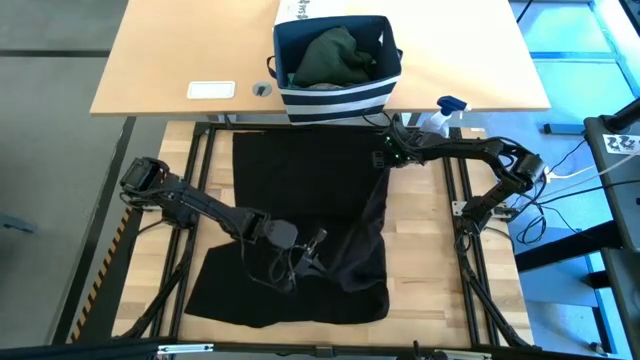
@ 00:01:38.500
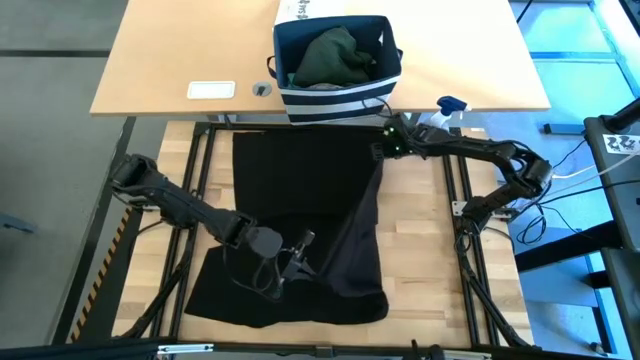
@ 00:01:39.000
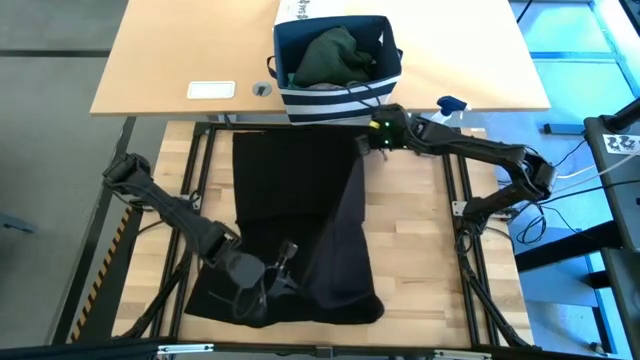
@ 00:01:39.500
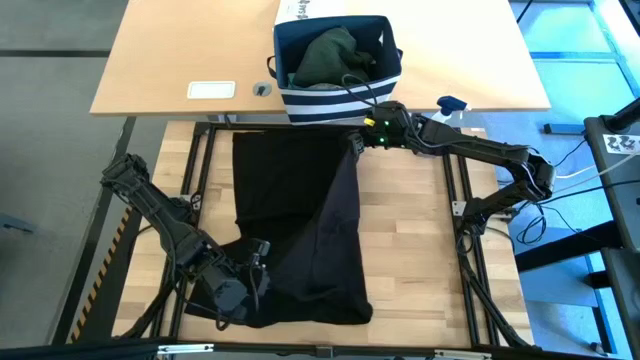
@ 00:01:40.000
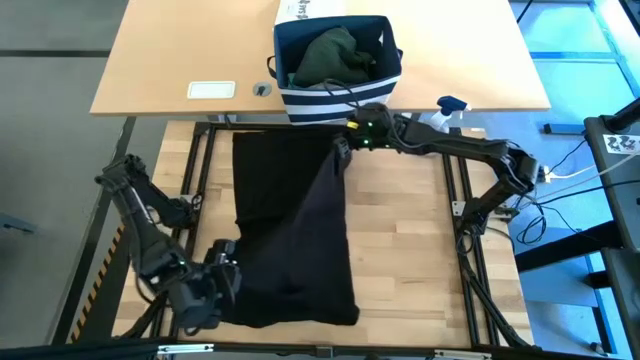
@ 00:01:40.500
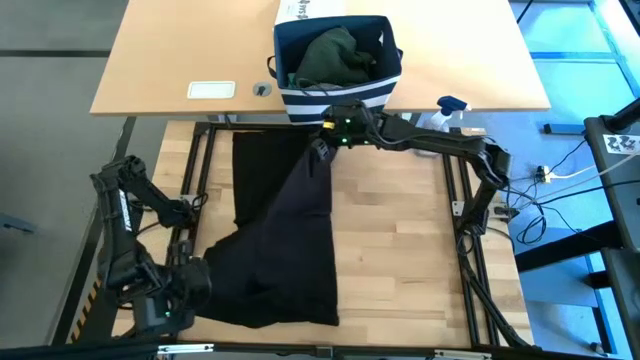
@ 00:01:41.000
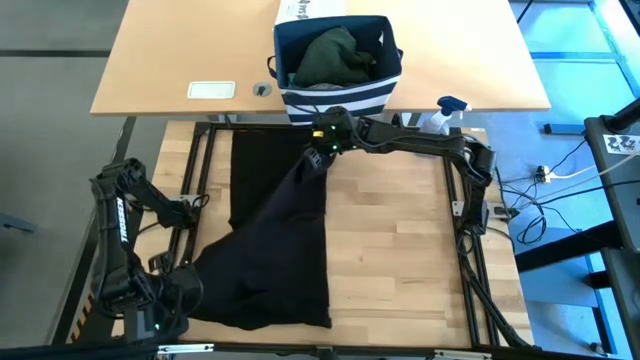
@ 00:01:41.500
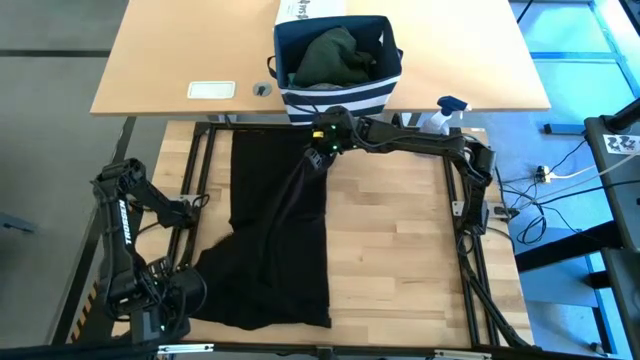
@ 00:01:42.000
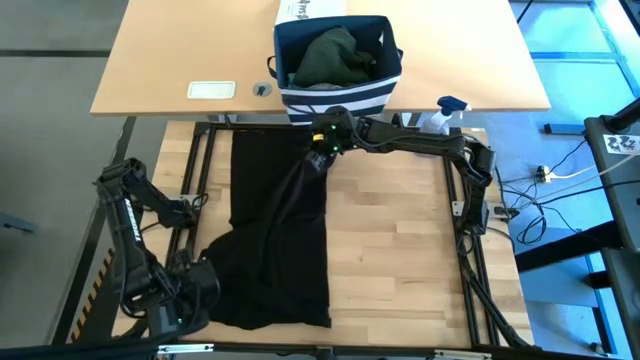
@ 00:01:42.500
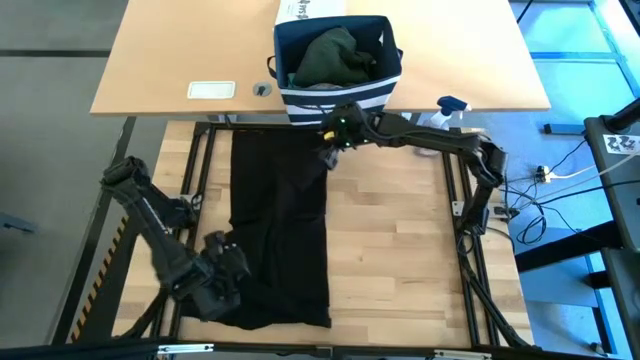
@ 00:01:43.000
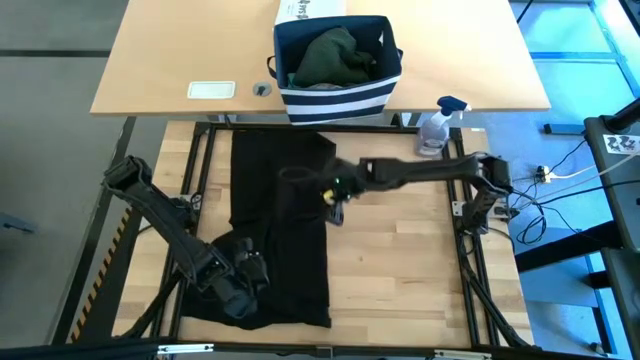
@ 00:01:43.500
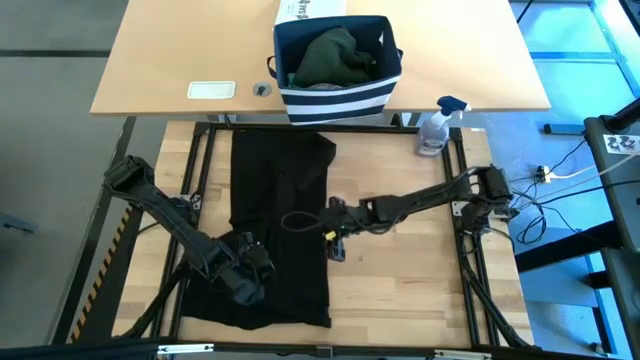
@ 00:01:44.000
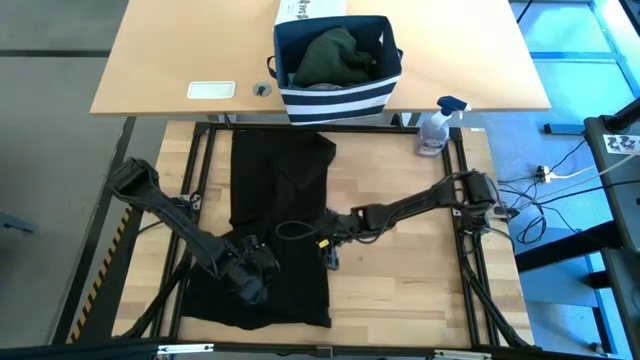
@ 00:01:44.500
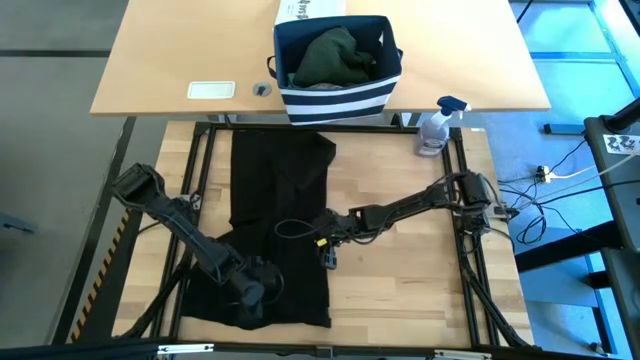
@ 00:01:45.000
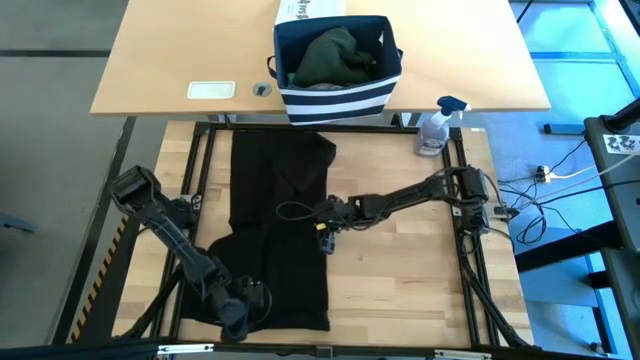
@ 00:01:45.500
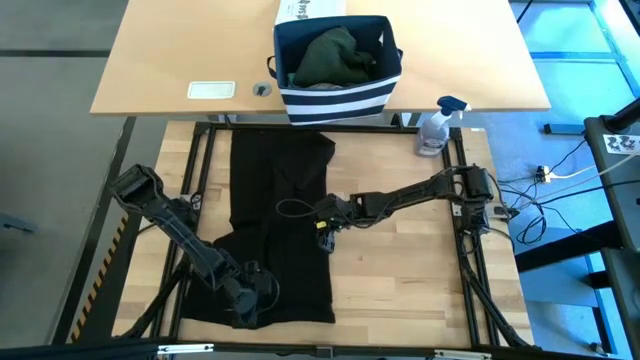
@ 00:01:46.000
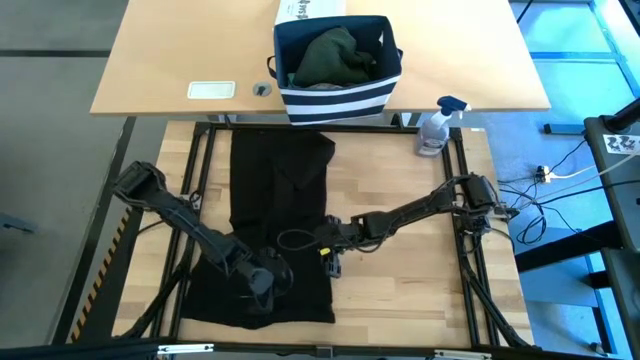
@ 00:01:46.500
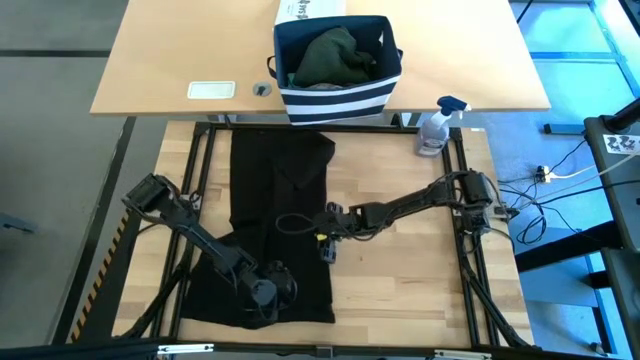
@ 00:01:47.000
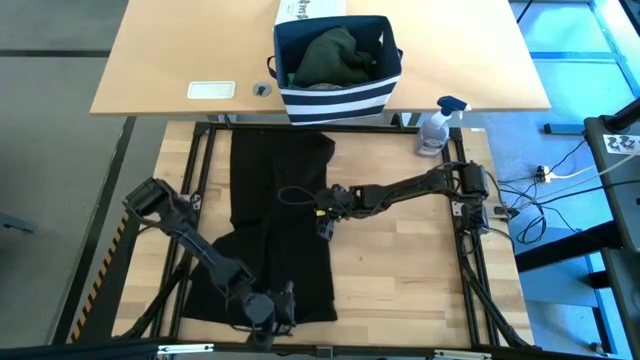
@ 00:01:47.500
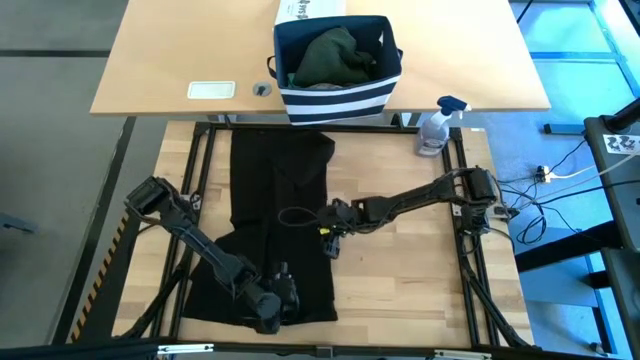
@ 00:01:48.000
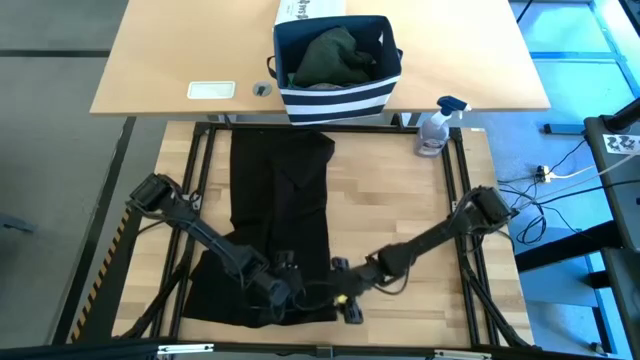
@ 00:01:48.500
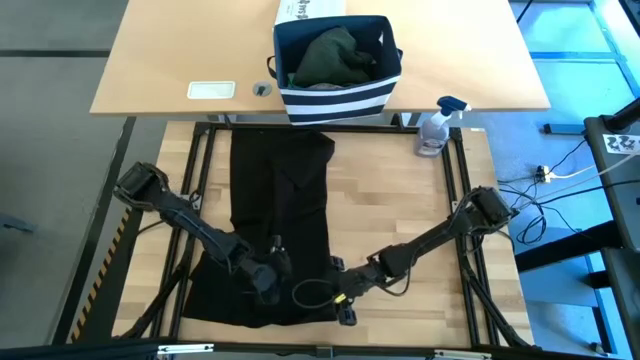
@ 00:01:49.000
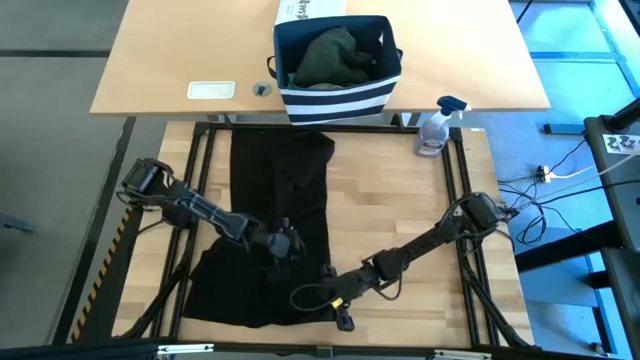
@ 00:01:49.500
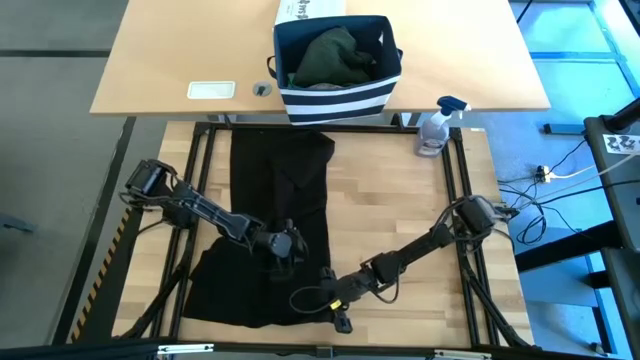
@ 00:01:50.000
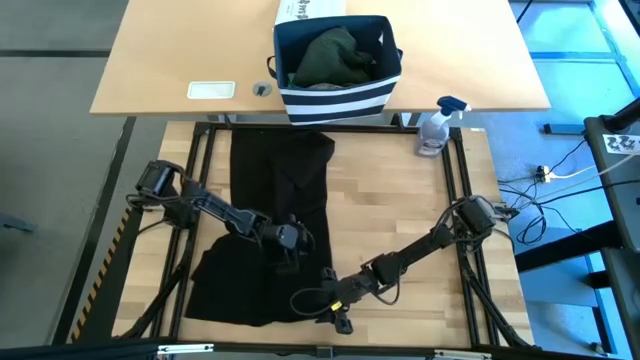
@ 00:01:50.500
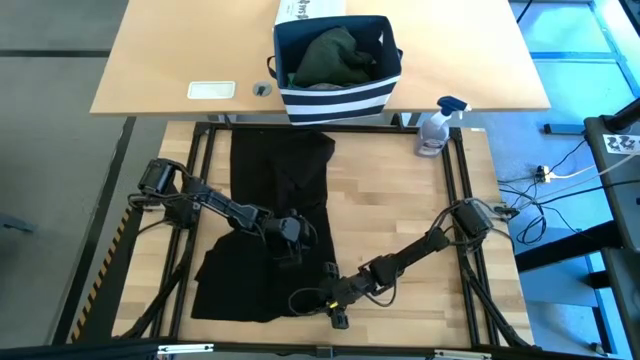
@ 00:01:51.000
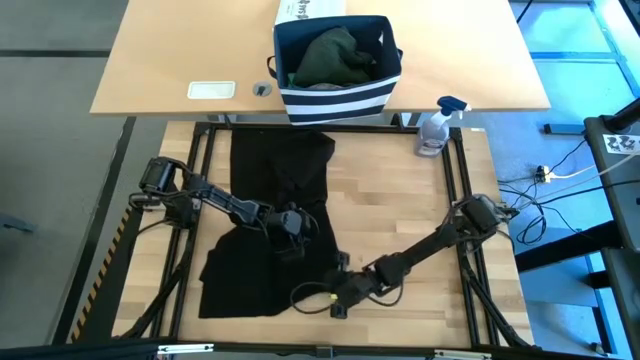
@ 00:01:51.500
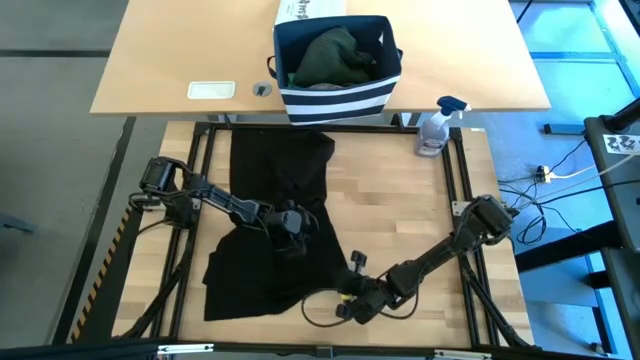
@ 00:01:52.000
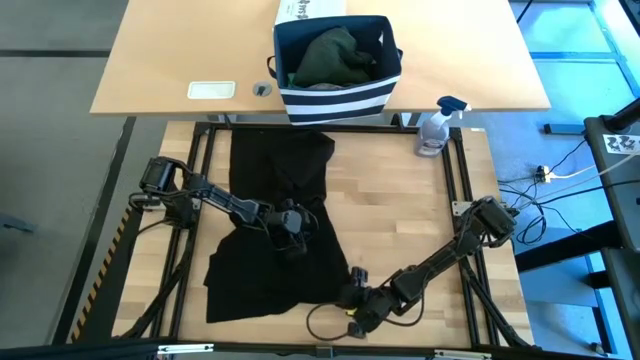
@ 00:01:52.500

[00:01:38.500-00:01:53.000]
Task: Fold Laundry from Bin
Fold the black shirt

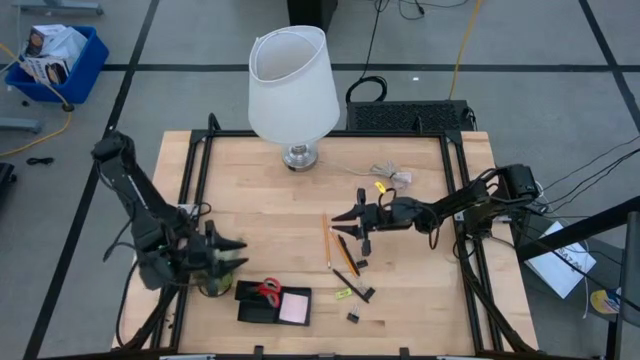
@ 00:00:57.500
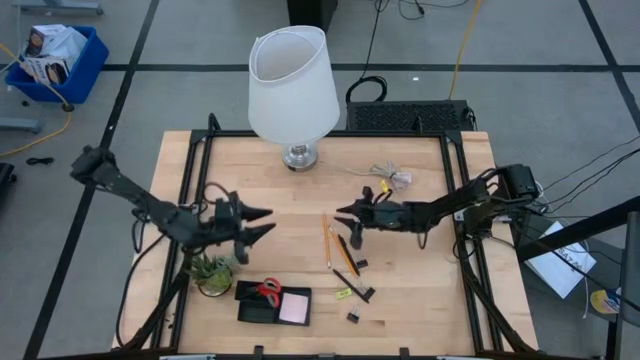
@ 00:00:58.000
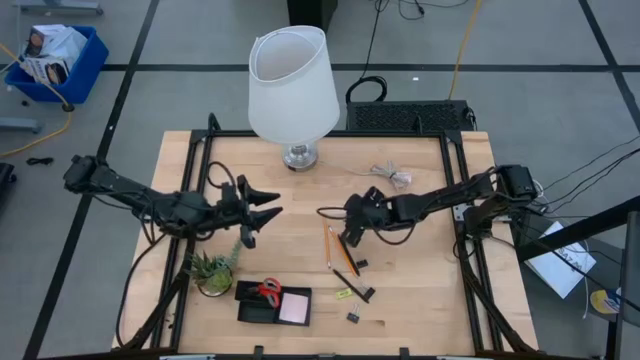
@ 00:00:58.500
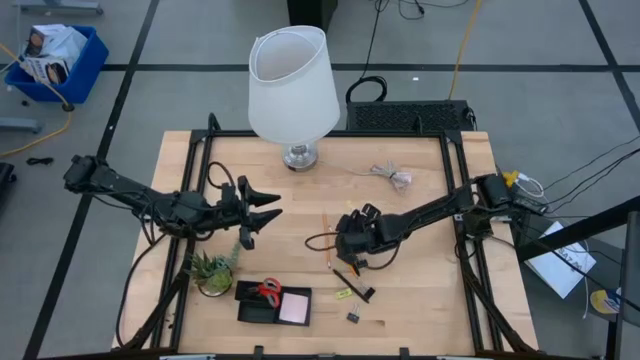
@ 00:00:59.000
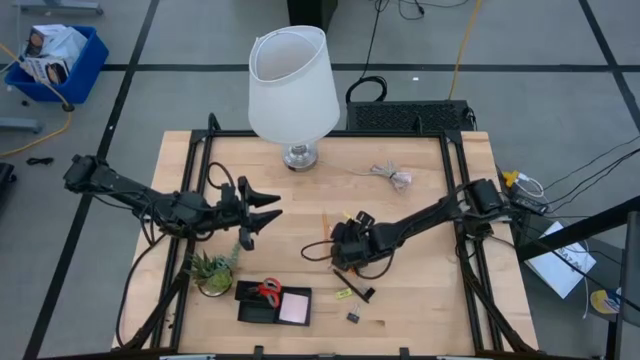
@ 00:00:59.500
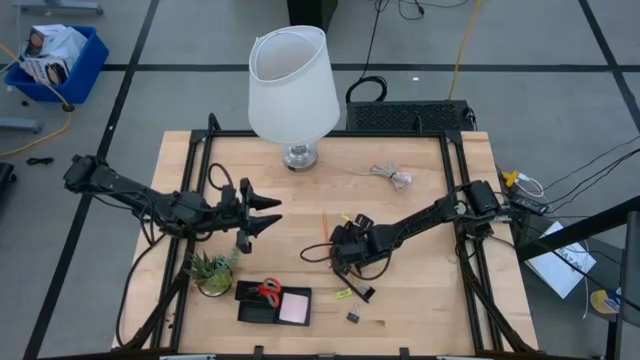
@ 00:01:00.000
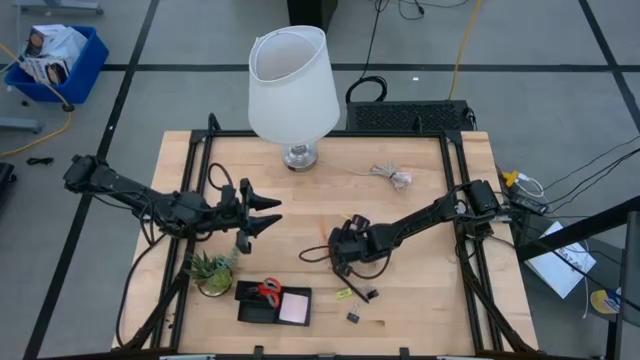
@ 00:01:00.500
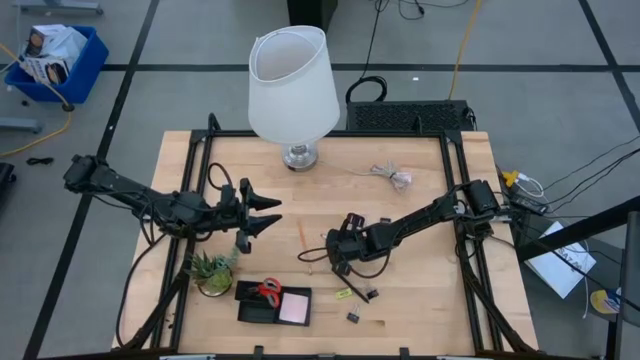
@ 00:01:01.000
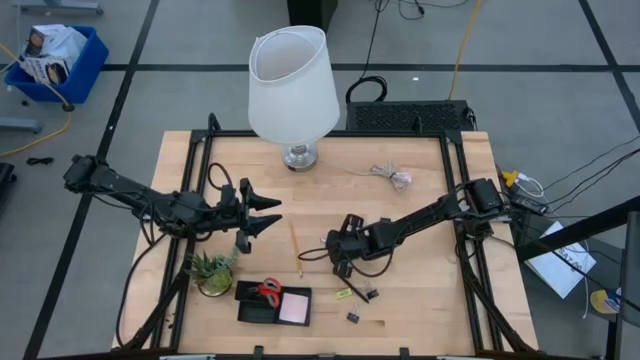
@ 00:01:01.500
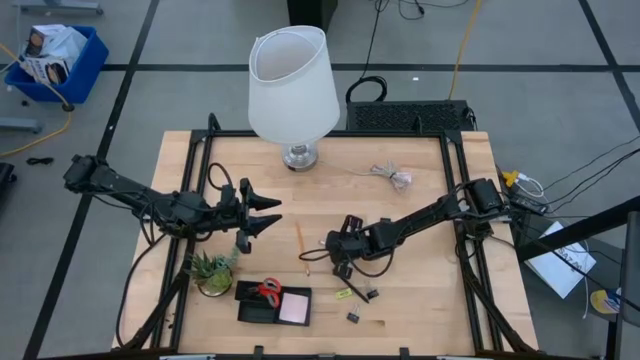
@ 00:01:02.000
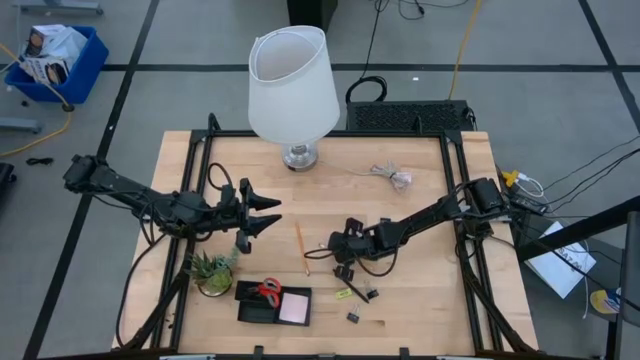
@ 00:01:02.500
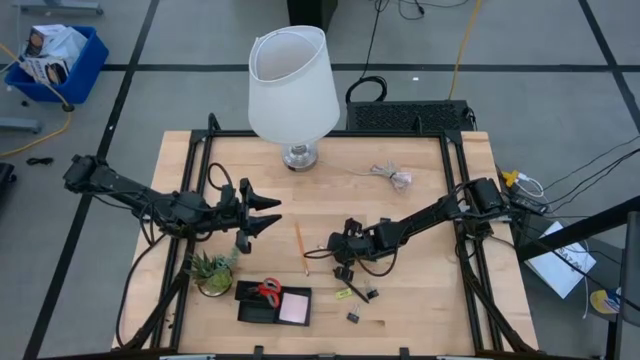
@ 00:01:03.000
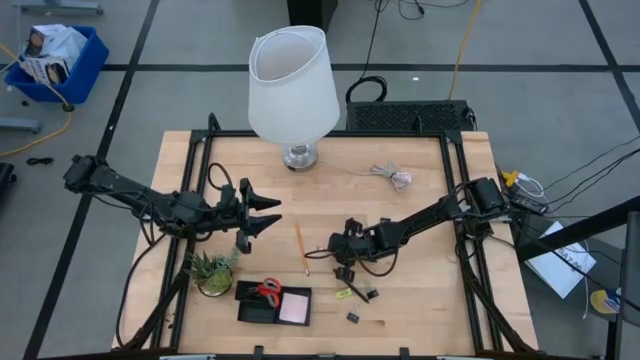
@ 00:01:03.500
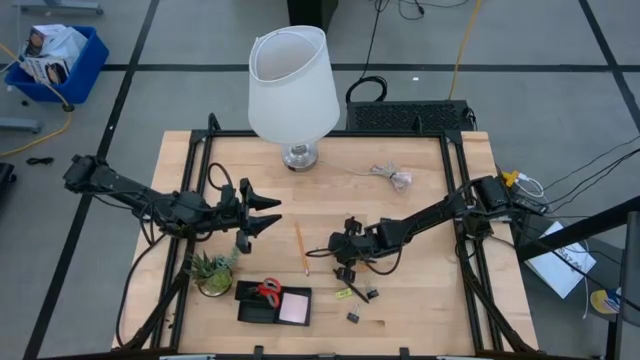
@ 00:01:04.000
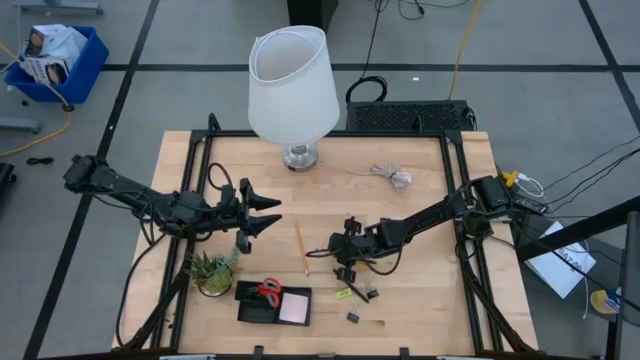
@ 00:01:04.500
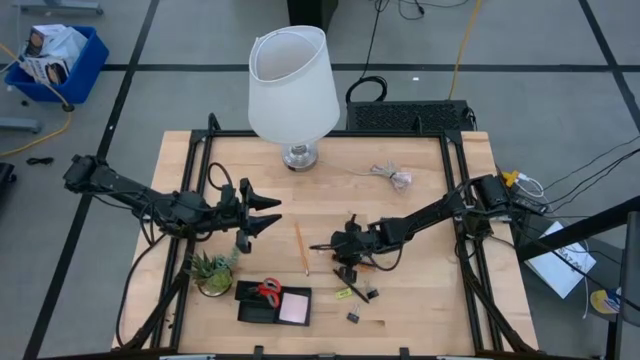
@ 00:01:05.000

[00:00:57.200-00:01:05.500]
Task: Pick and place office supplies into organizer
Put the black pen into the black desk organizer
